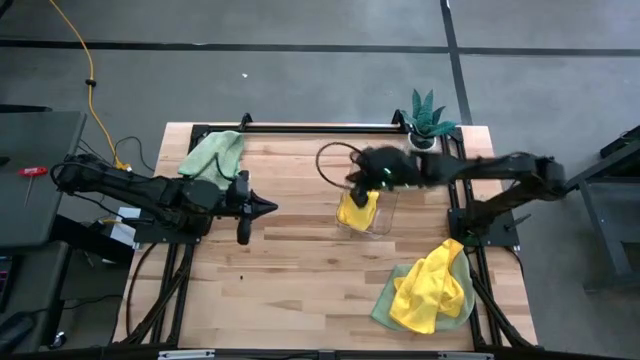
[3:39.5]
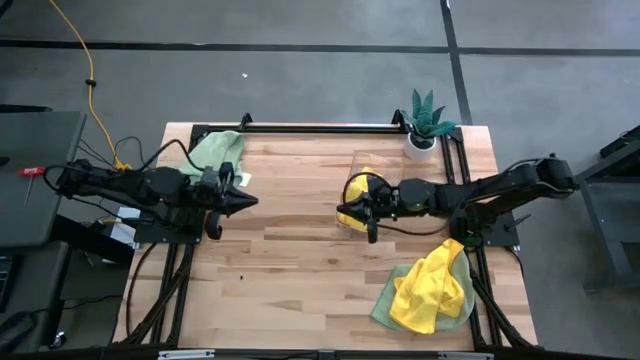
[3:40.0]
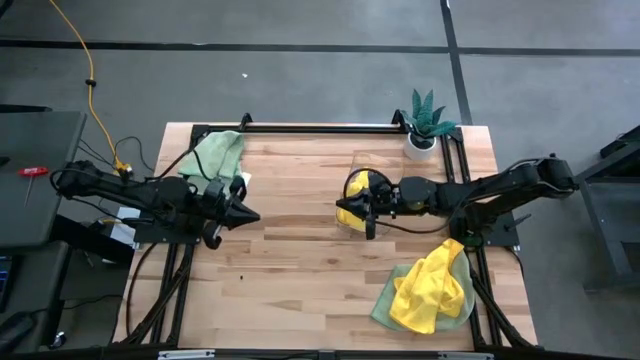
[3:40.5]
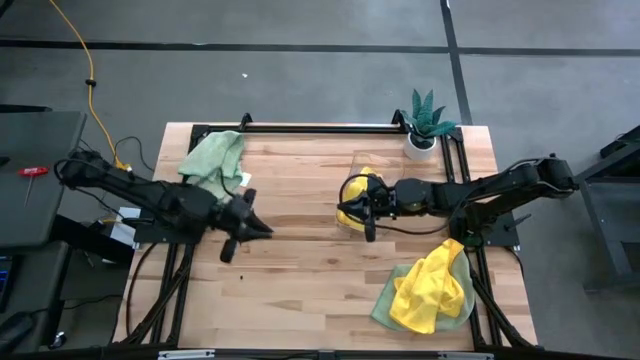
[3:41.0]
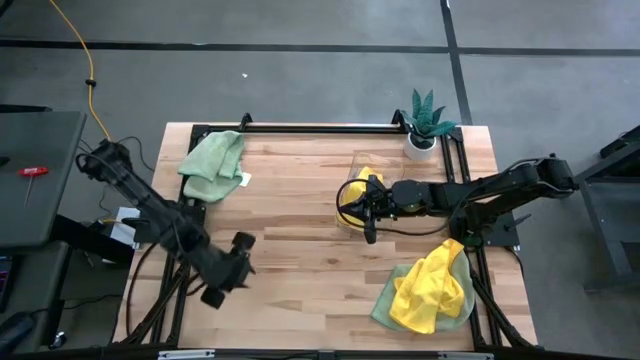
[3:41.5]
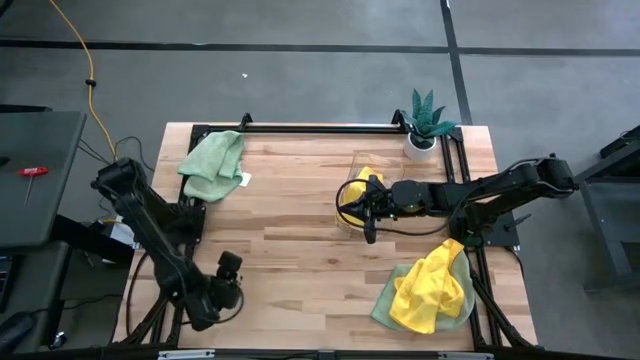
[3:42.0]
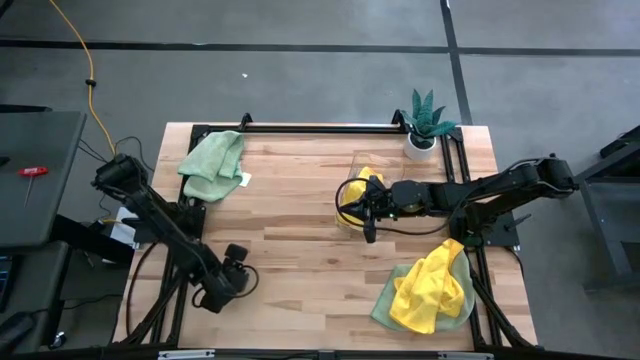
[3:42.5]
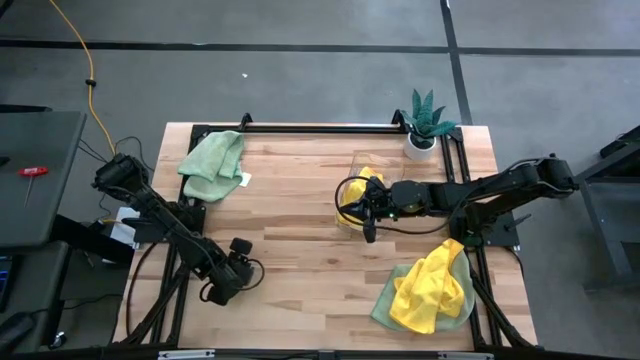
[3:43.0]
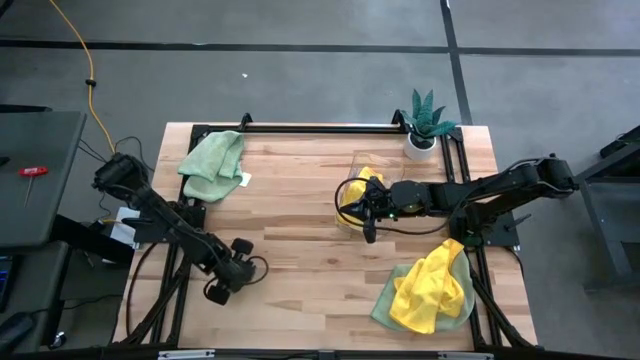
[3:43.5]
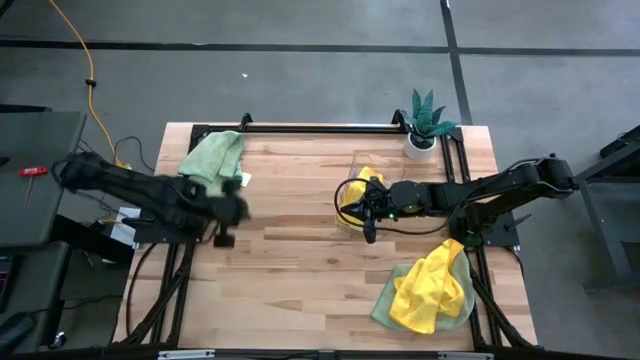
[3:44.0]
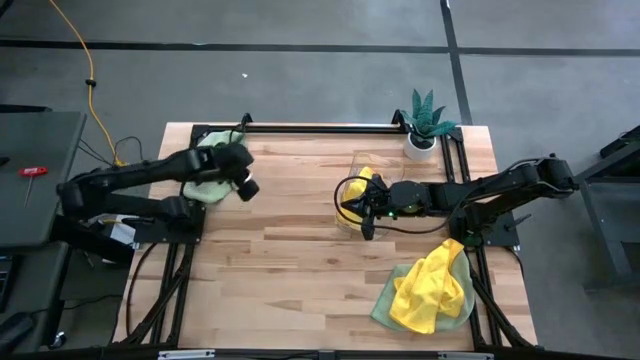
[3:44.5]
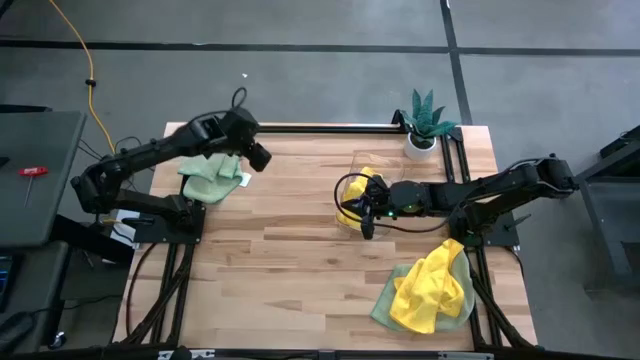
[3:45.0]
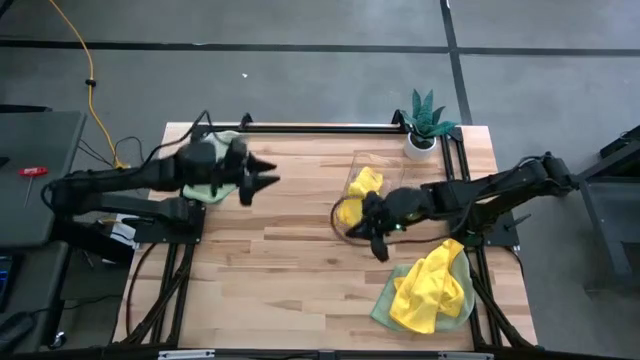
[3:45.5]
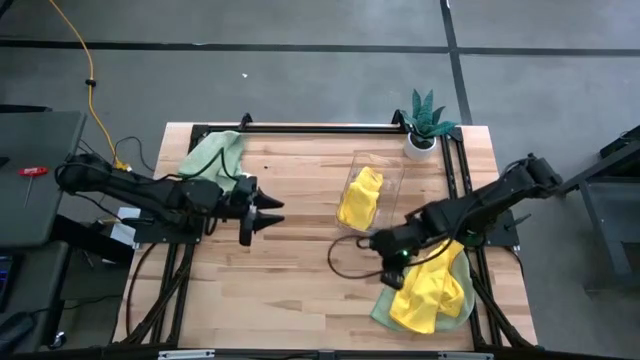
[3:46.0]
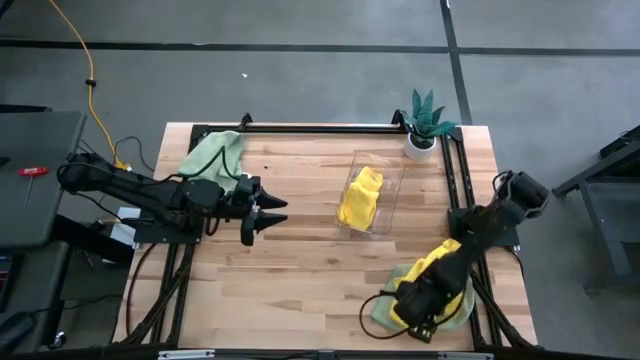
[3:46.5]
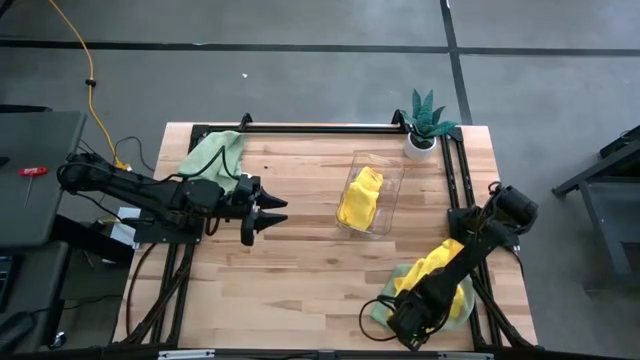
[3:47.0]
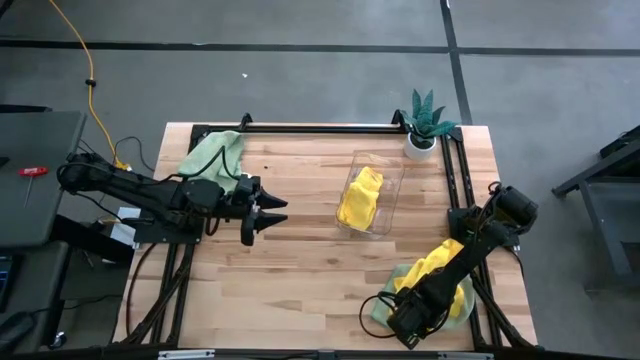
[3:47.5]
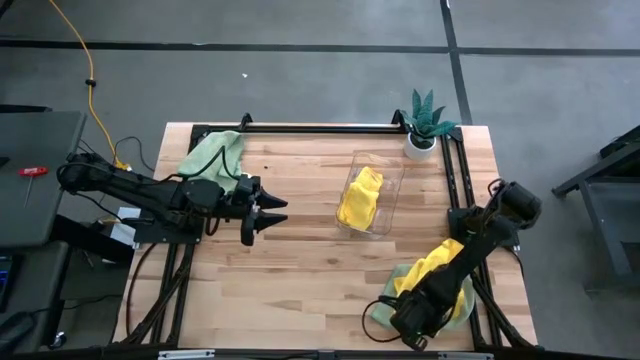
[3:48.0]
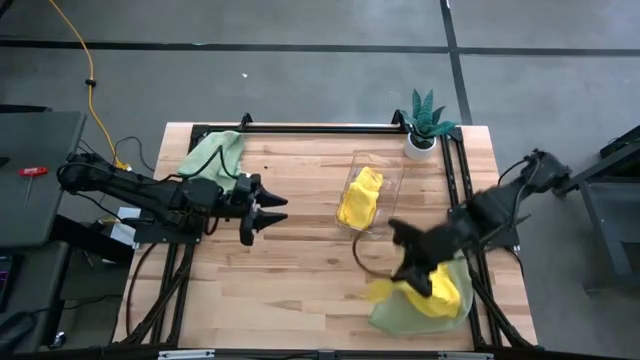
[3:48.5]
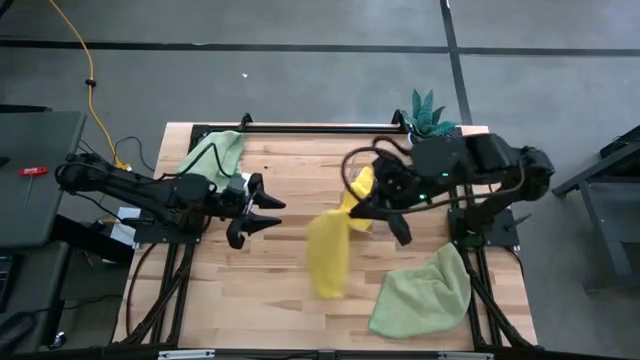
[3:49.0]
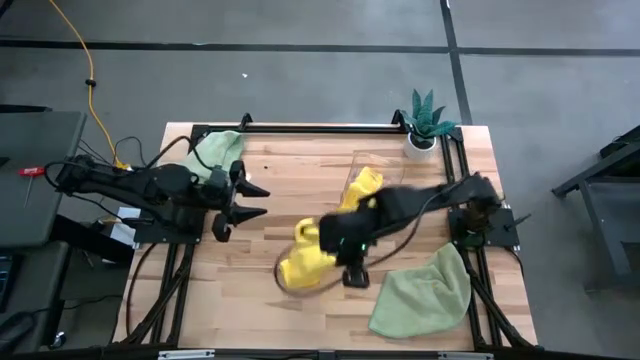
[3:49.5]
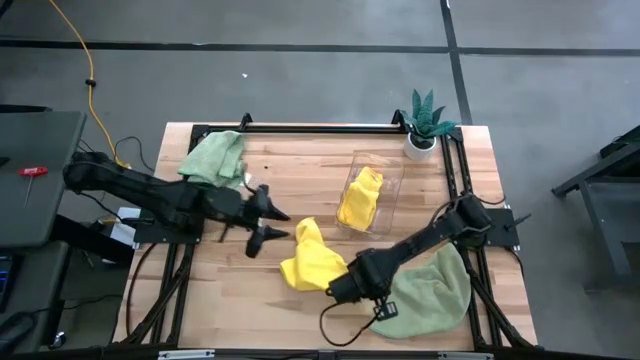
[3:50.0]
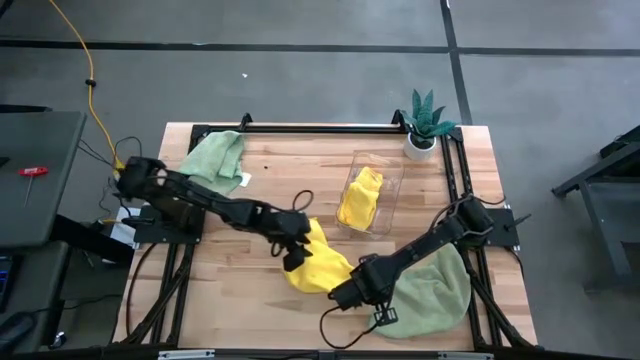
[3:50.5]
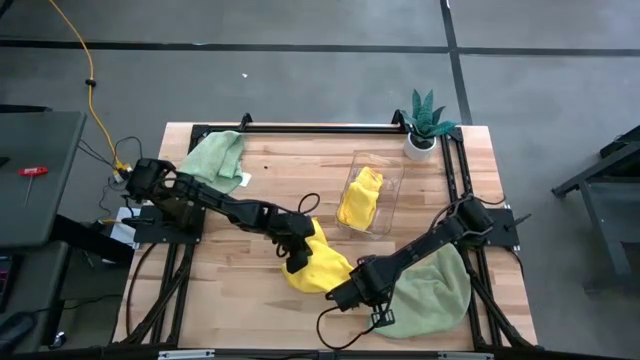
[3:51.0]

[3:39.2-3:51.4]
Task: Fold microfiber towels
Fold the yellow microfiber towel

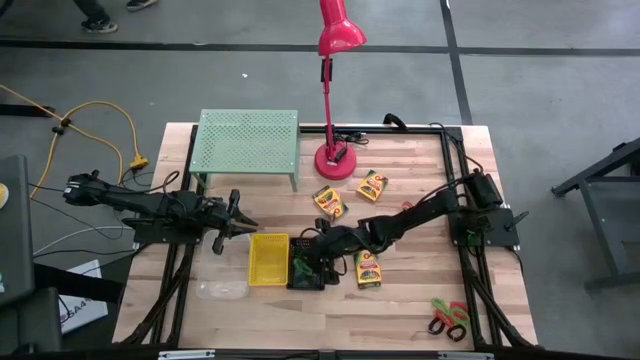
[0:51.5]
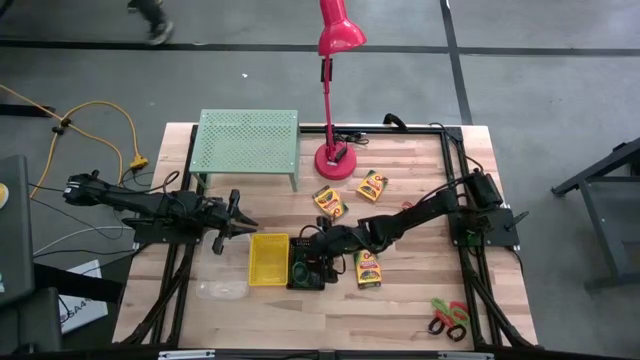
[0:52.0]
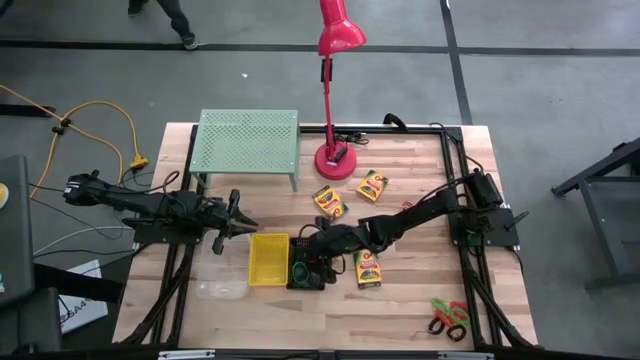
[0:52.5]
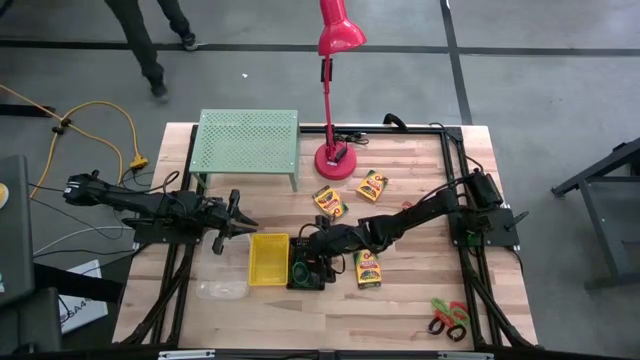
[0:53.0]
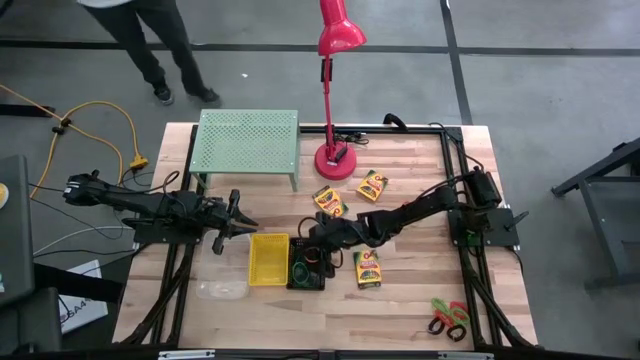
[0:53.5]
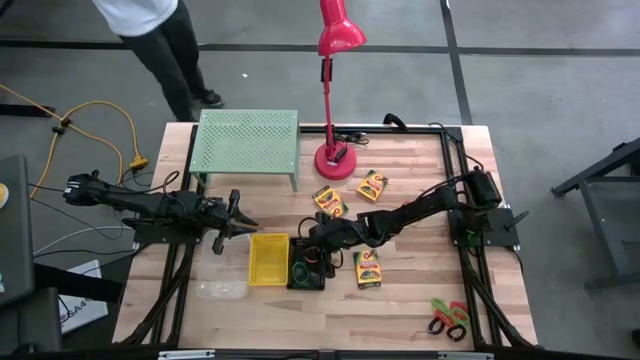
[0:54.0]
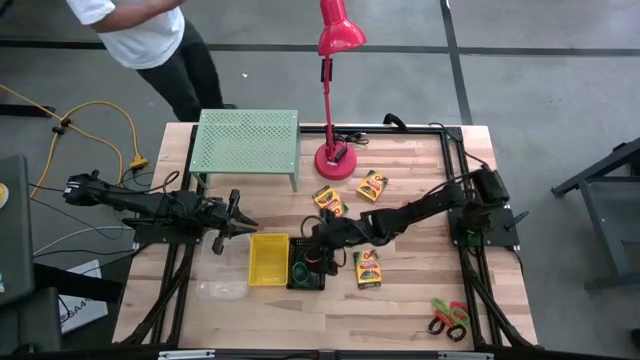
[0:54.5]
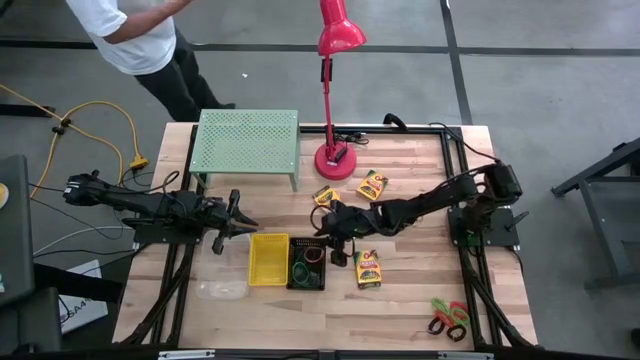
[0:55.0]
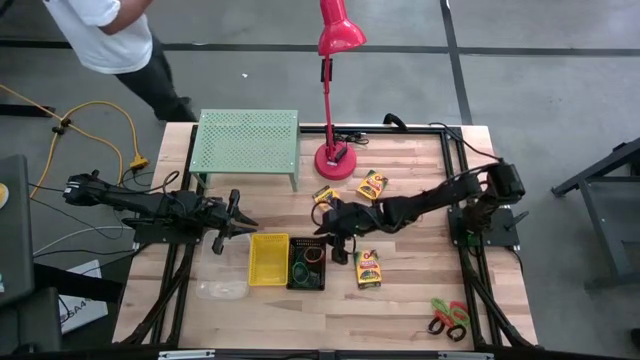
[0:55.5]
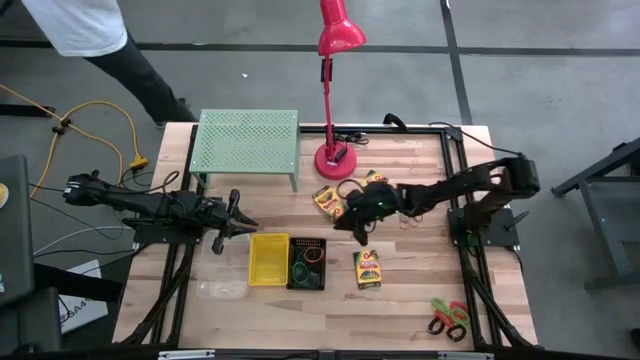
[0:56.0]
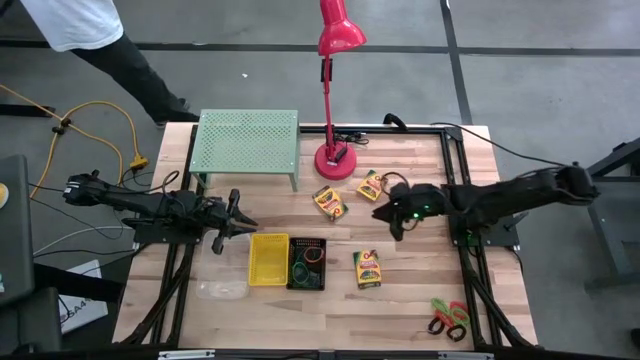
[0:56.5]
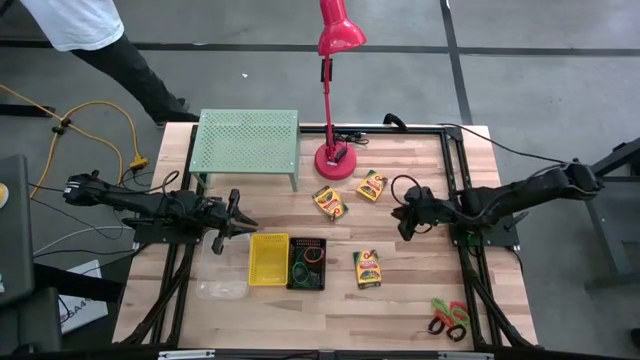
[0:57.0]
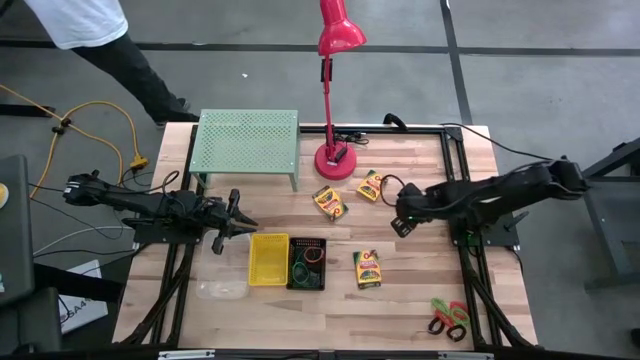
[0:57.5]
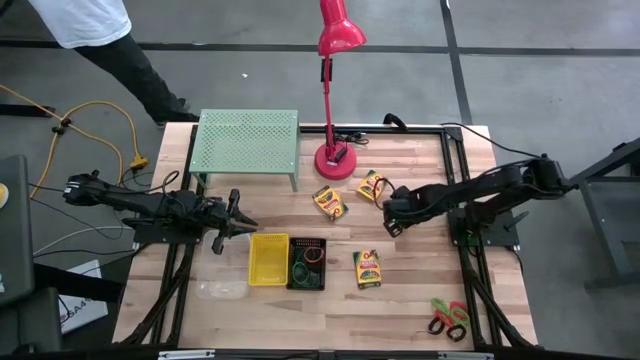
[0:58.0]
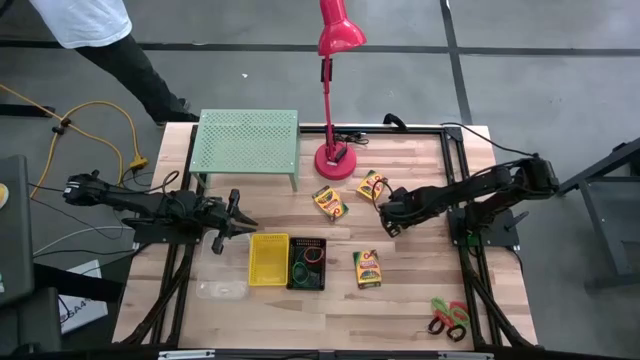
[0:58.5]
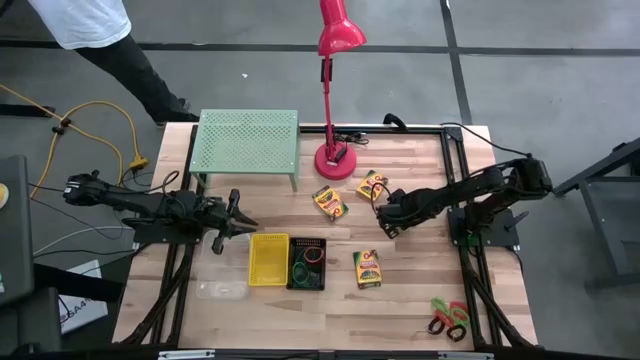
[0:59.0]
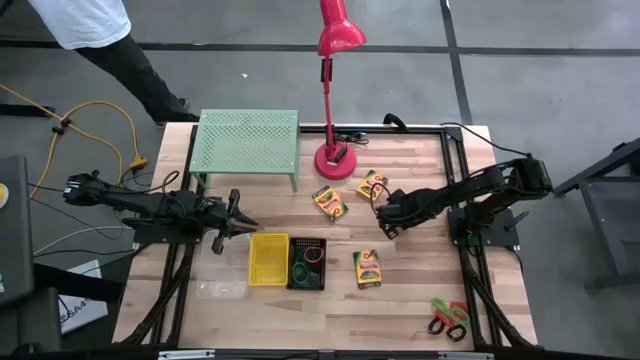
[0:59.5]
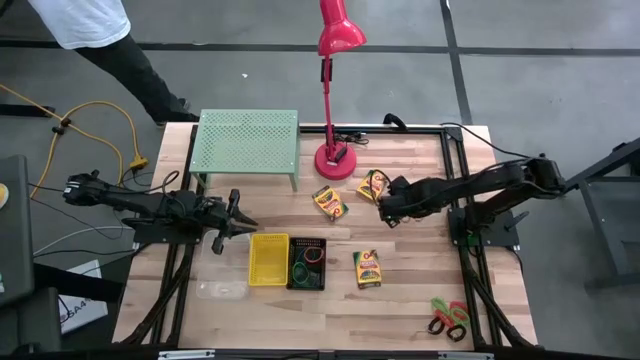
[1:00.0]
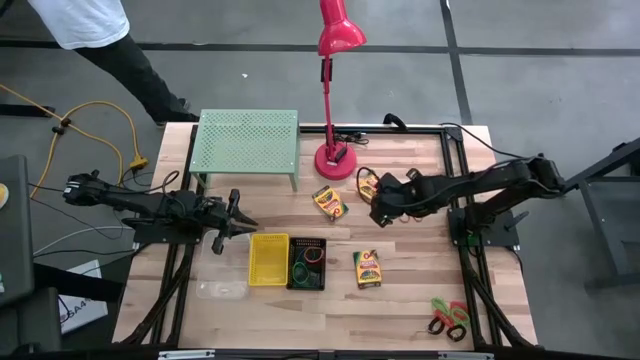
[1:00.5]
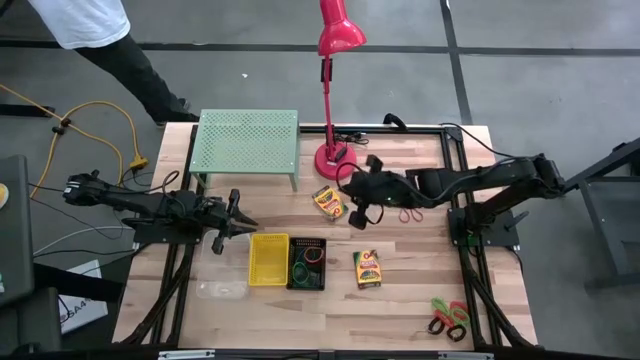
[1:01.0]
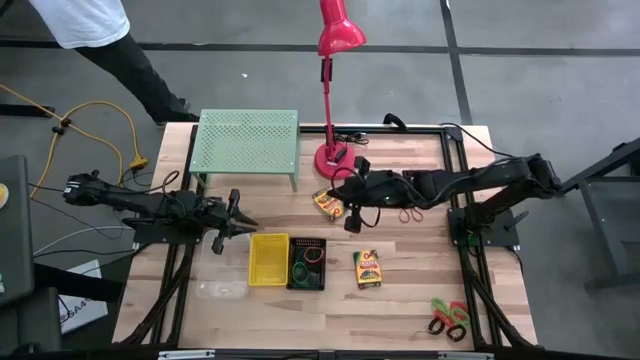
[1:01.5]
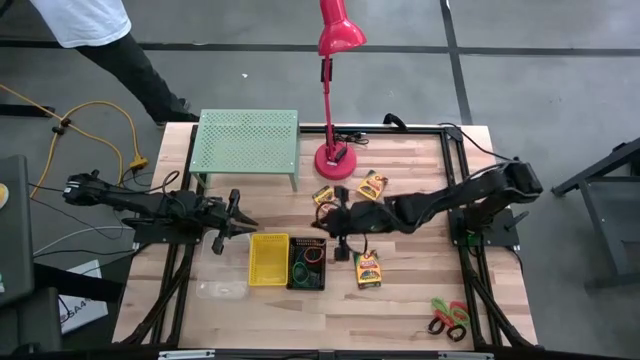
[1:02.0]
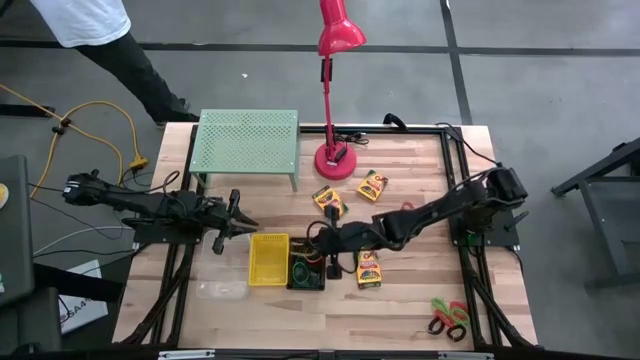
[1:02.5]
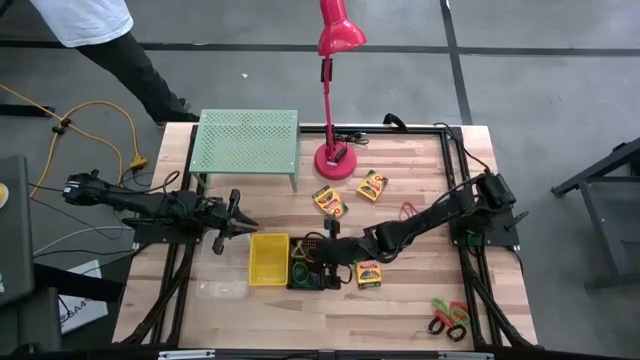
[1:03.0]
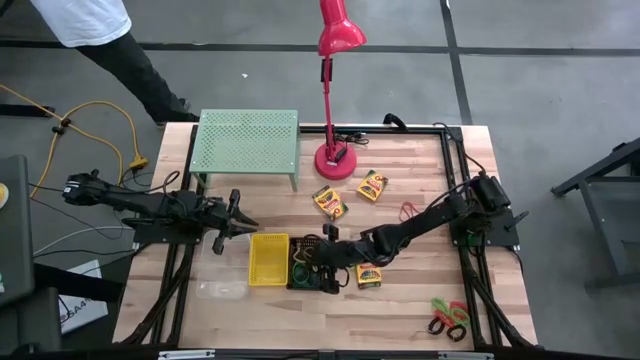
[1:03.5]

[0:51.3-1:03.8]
Task: Pick & Place Office Desk Supplies
Put the yellow rubber band into the black bin
